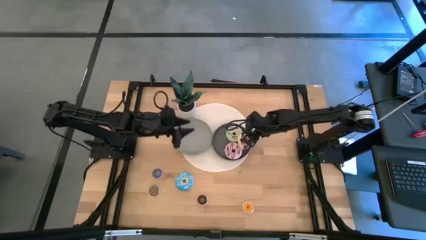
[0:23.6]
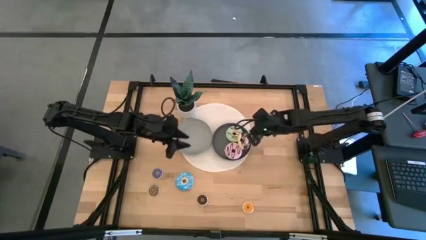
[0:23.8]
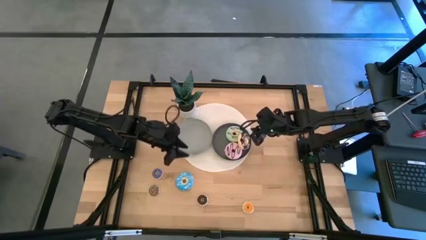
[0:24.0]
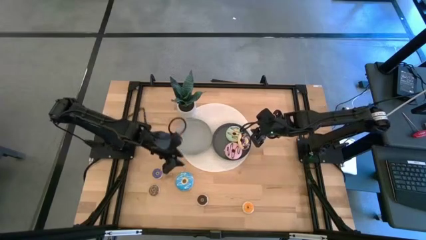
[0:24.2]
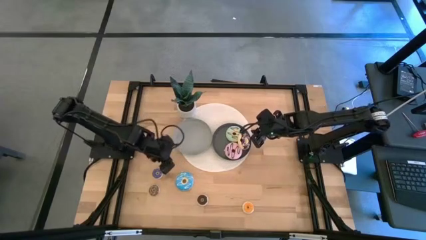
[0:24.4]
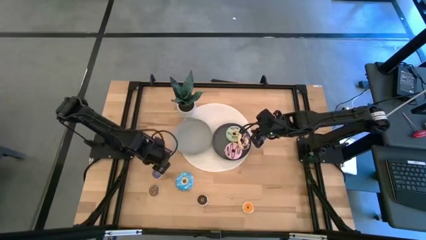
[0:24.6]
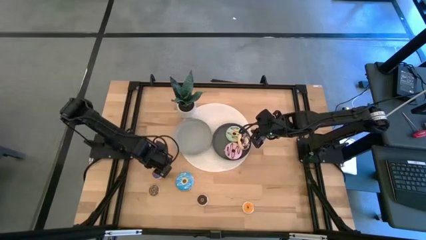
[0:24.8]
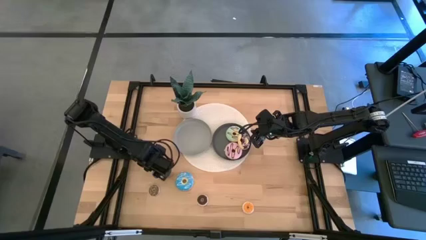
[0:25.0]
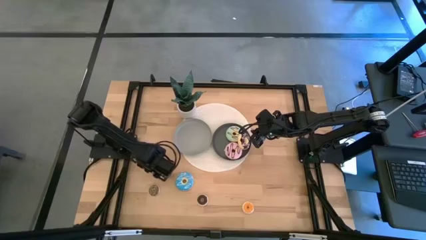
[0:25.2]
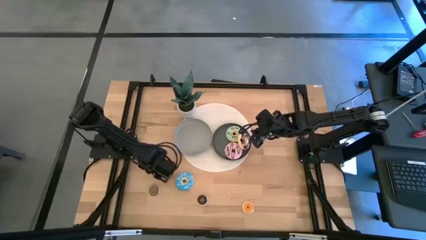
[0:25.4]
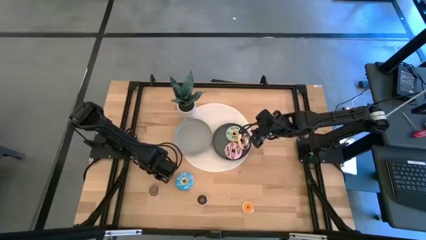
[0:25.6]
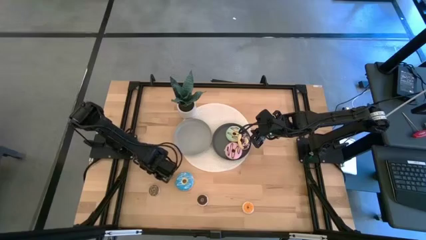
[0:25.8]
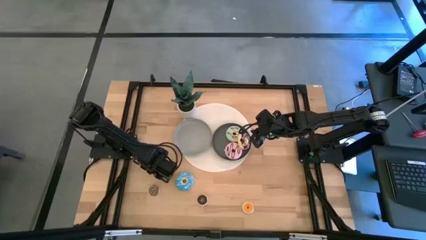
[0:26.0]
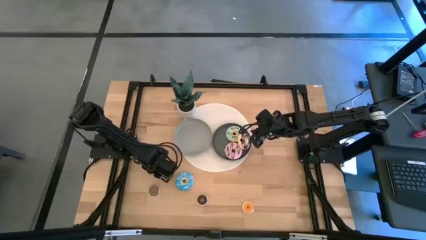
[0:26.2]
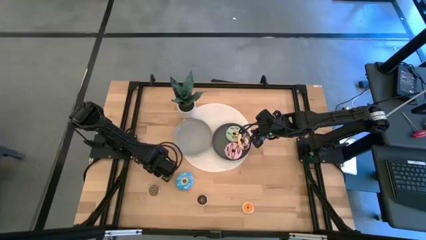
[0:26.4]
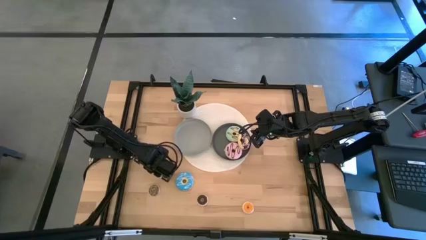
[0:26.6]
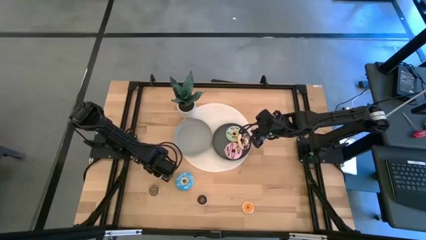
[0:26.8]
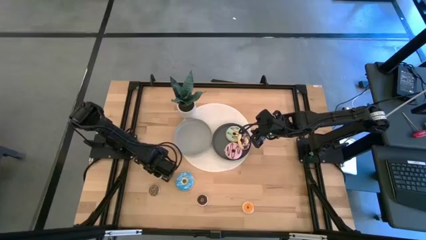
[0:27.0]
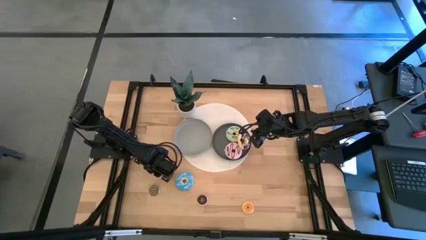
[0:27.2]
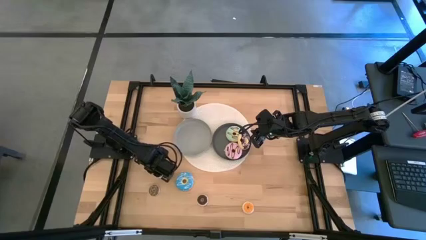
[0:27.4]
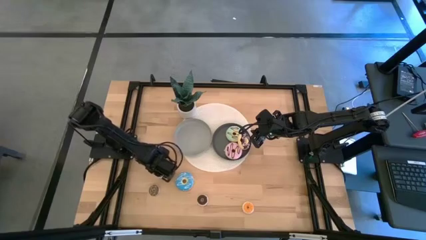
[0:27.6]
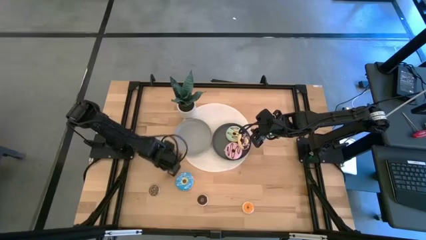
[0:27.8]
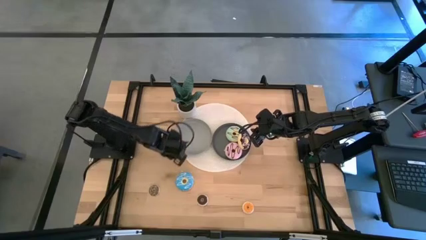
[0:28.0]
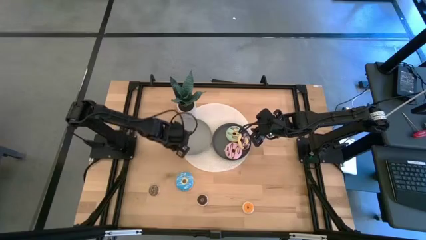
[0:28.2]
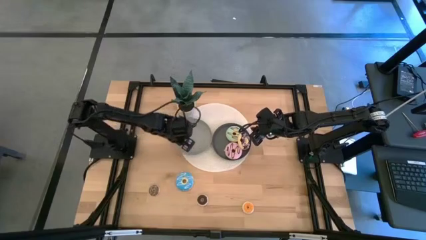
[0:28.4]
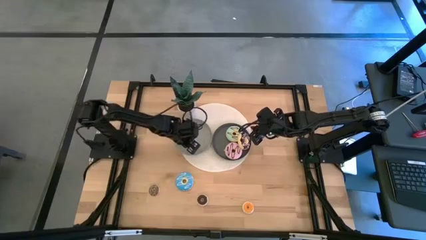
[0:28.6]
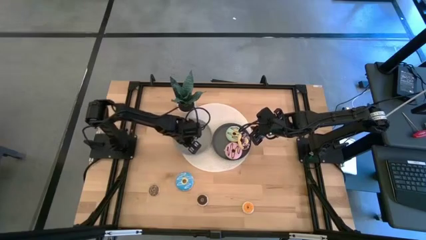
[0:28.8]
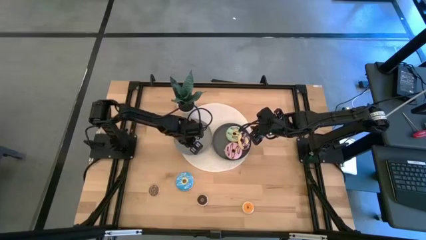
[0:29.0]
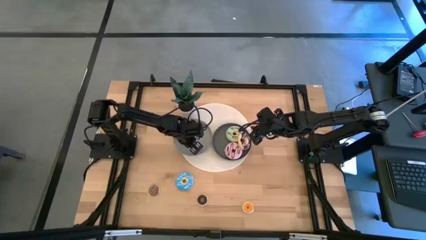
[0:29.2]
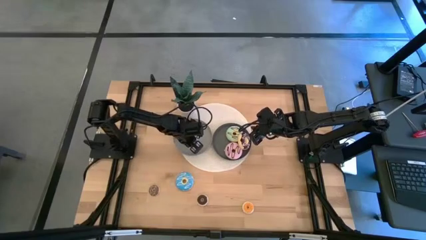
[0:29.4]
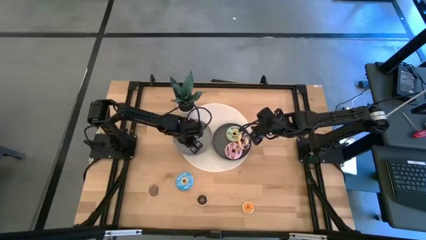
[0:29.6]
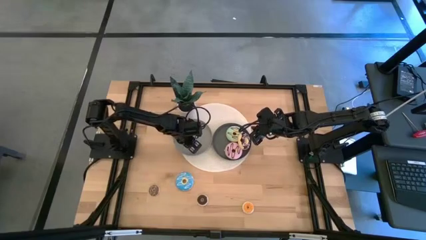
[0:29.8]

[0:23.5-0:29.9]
Task: Pick & Place donuts
Put the small blue donut on the gray plate

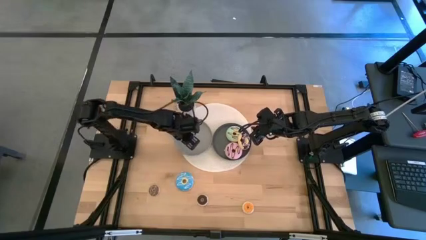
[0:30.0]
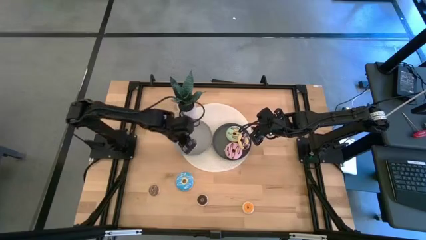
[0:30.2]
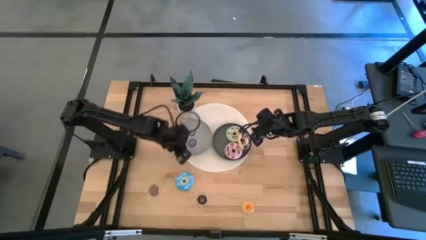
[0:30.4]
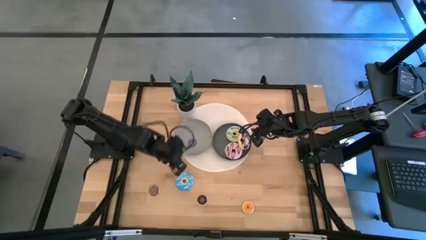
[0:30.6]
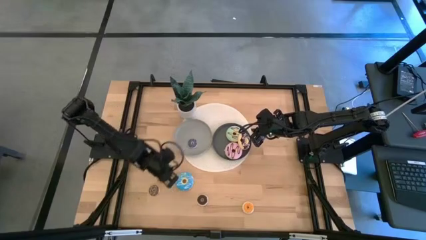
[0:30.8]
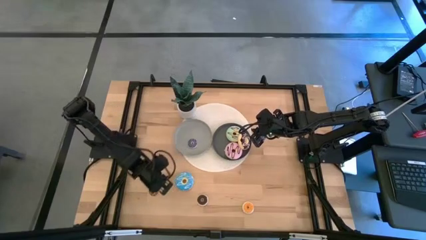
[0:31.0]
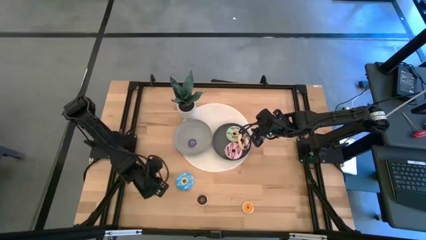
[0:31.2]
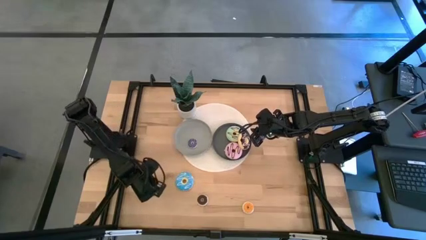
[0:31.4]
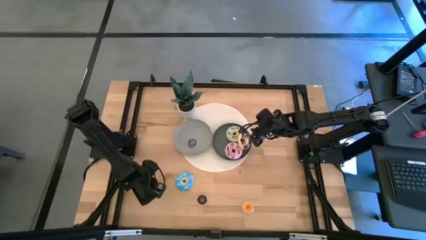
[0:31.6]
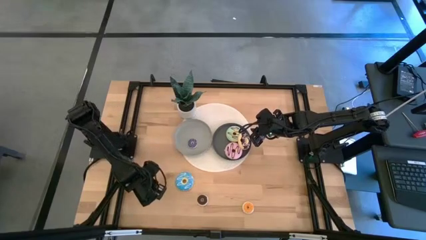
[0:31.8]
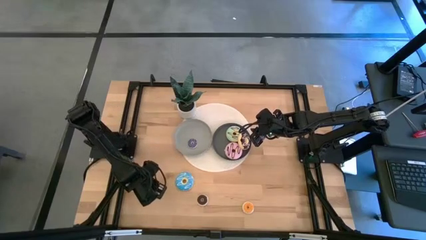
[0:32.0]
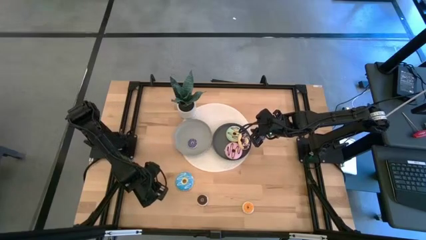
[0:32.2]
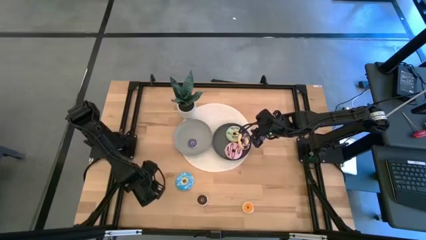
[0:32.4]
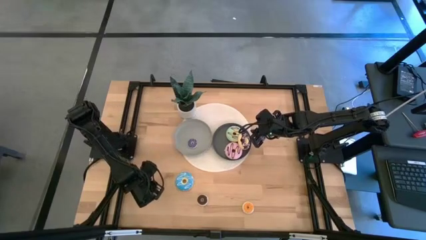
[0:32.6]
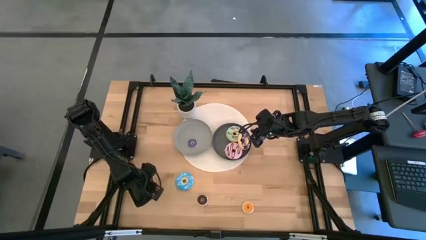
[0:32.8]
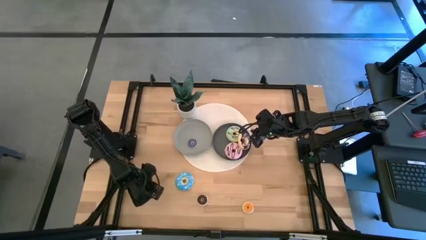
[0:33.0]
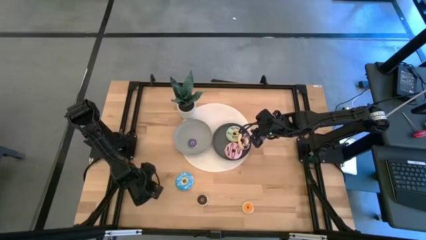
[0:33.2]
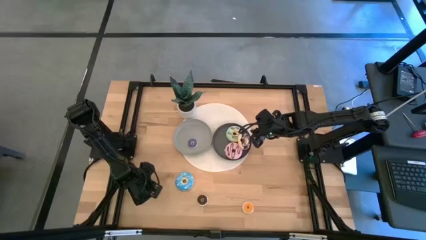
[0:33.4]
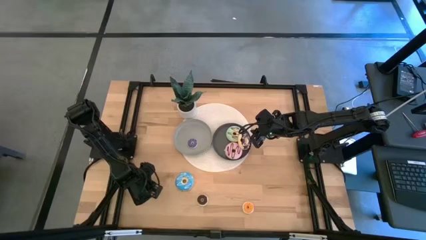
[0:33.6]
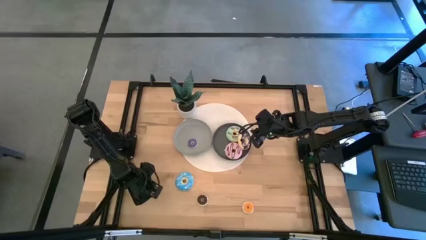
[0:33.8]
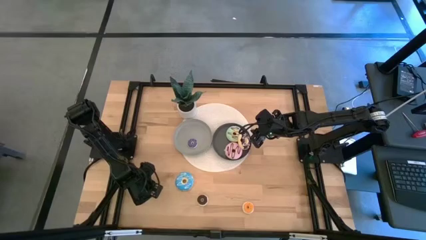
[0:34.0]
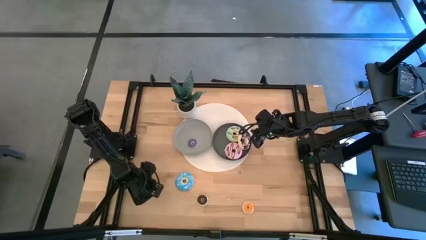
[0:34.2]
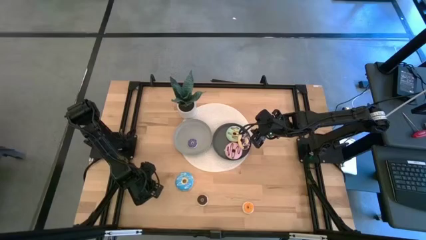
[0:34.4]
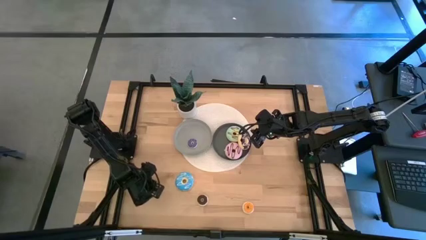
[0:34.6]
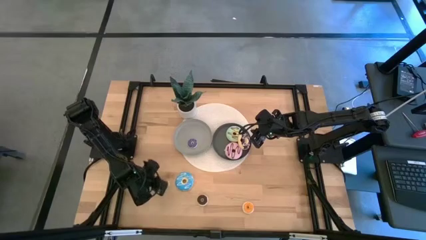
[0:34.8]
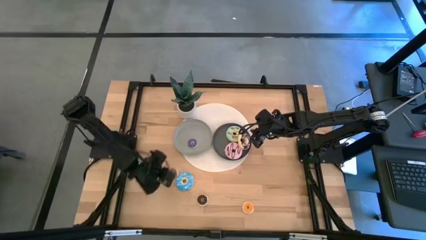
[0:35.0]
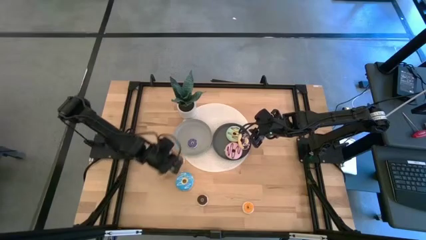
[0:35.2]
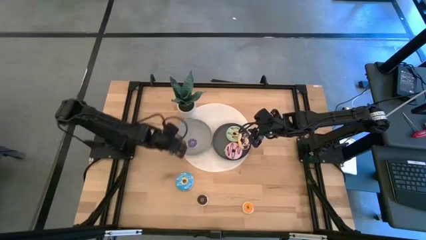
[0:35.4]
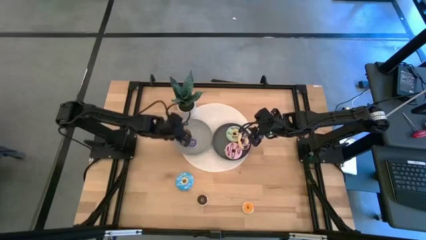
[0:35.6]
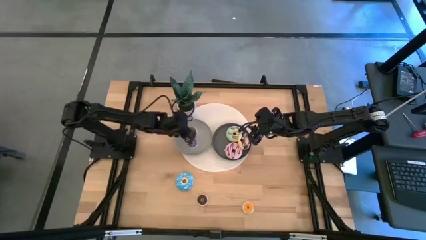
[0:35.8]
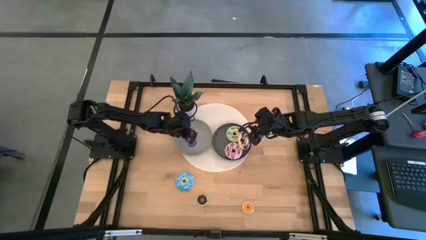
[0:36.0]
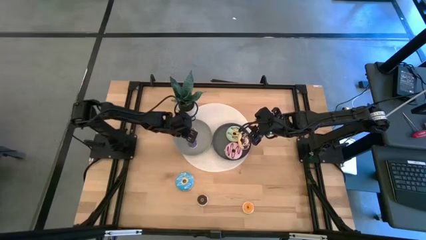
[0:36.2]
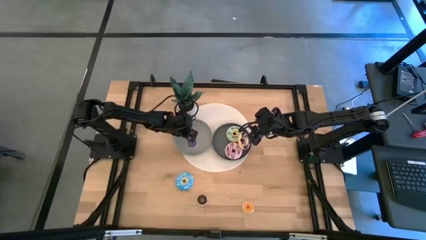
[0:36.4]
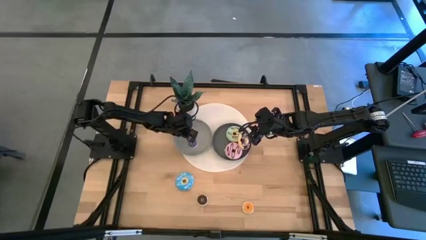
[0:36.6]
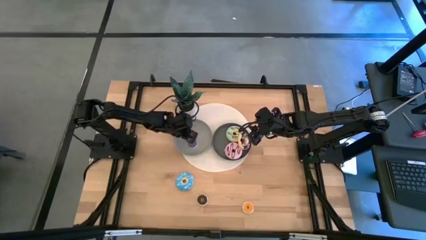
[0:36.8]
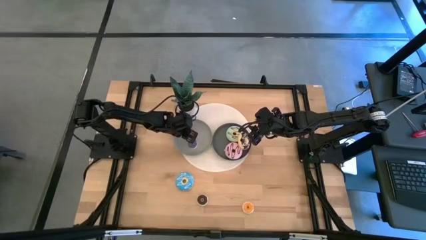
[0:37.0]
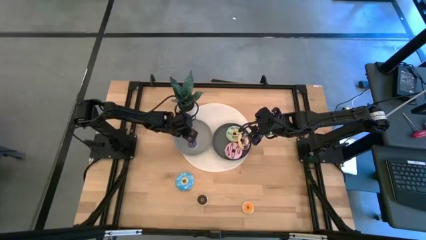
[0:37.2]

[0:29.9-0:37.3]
Put the small brown donut on the gray plate

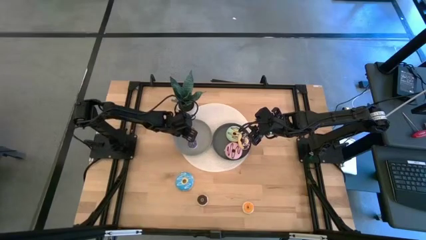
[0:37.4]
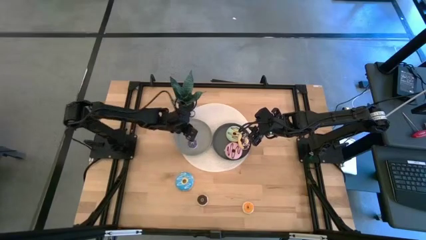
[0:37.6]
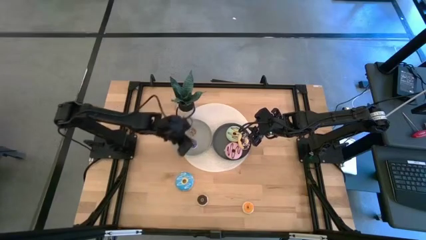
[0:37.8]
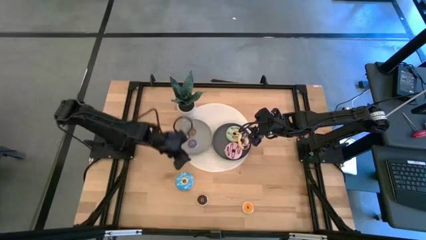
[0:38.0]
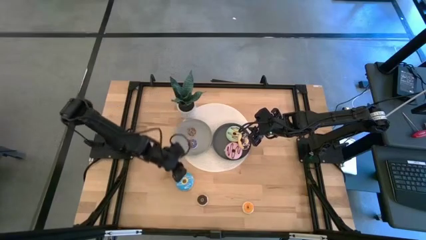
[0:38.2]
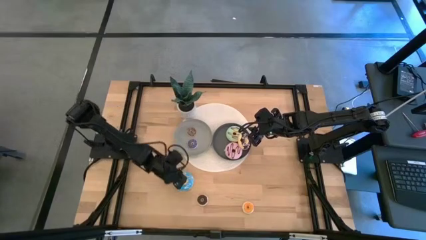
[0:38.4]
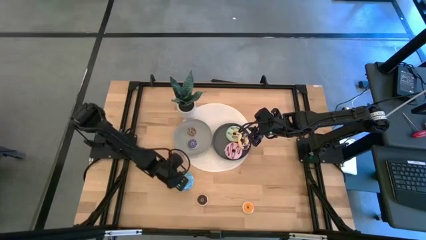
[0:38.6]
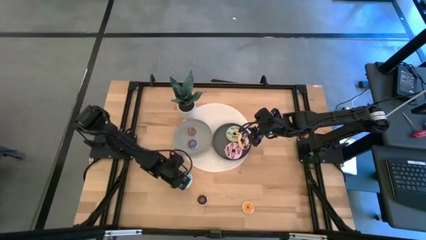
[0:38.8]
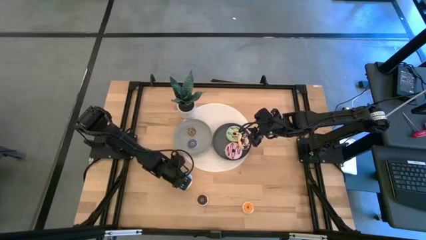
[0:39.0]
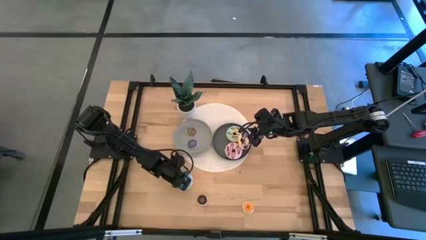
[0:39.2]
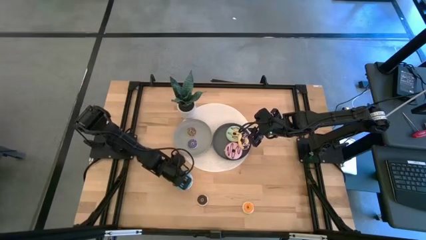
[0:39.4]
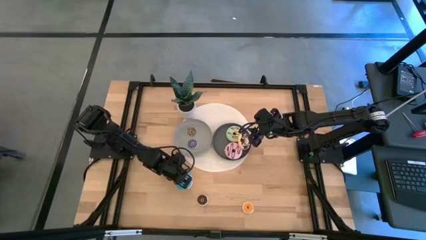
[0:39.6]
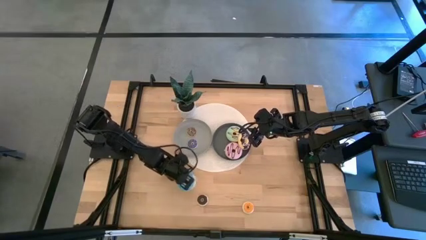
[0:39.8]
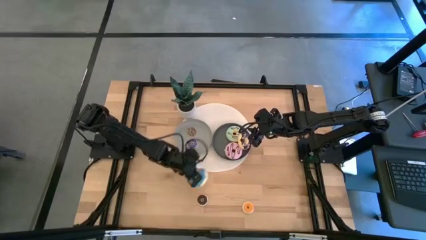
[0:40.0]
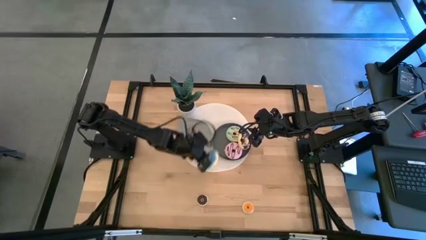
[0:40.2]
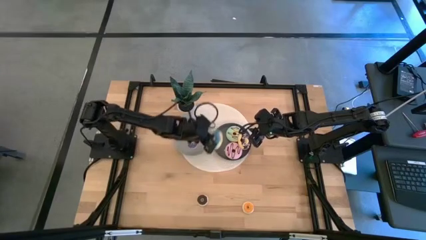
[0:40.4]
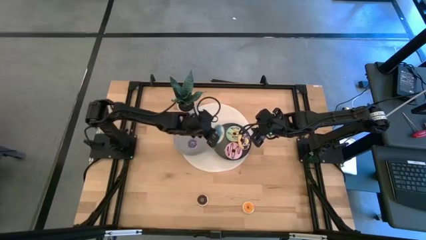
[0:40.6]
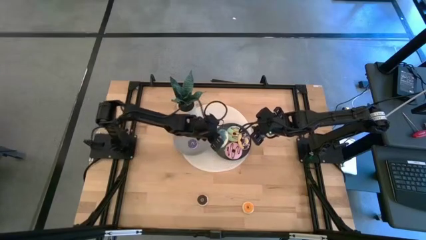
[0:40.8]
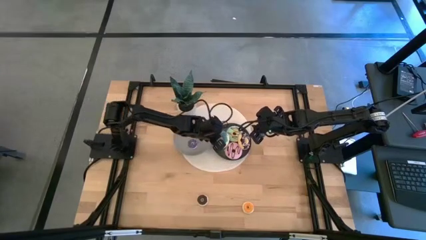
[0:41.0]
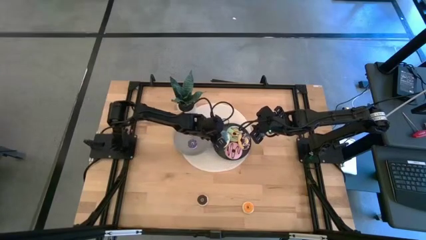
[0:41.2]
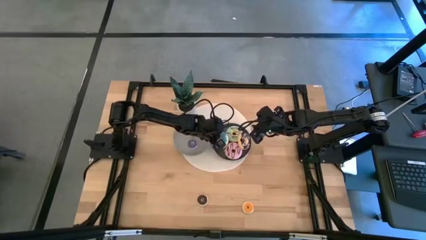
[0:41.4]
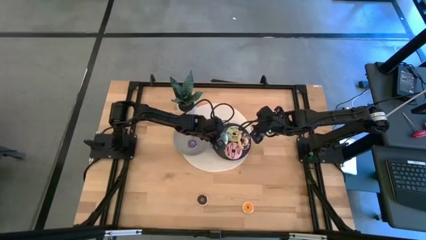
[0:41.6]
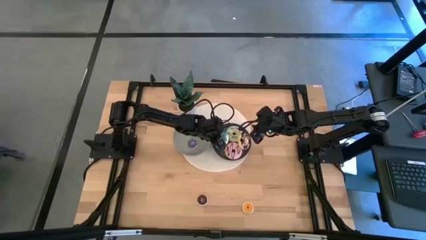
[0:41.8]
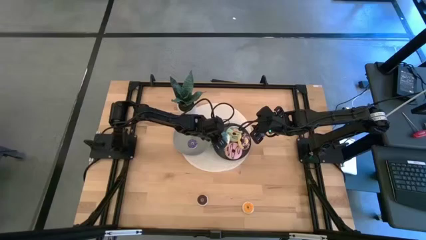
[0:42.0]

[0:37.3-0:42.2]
Put the large blue donut on the green plate
